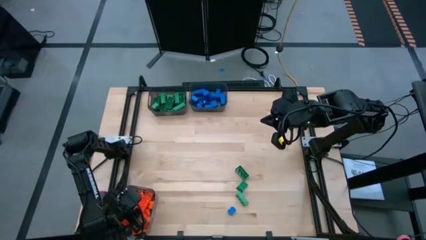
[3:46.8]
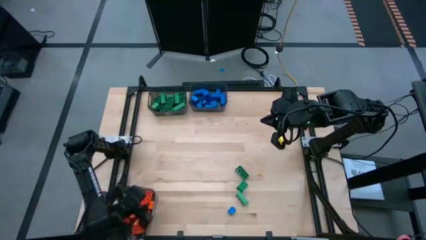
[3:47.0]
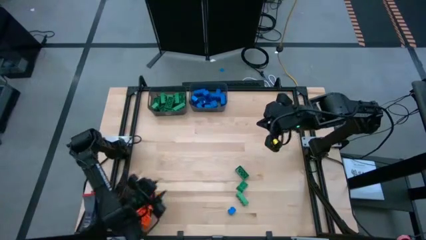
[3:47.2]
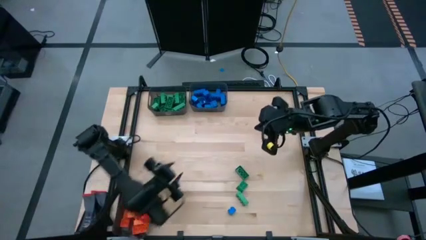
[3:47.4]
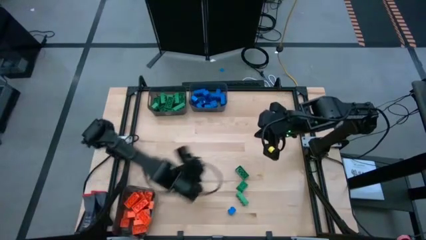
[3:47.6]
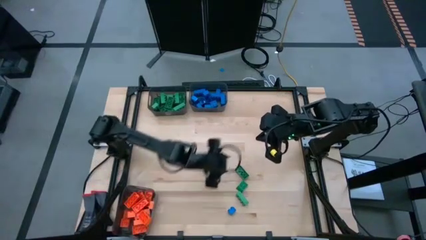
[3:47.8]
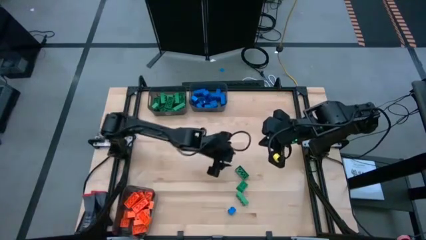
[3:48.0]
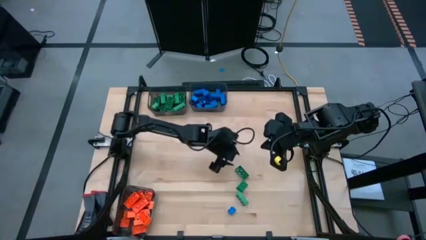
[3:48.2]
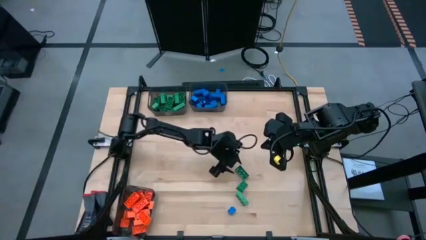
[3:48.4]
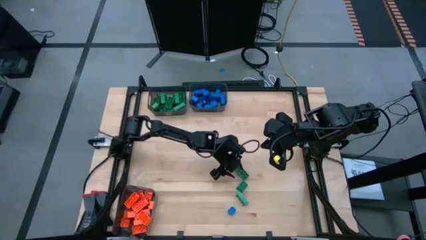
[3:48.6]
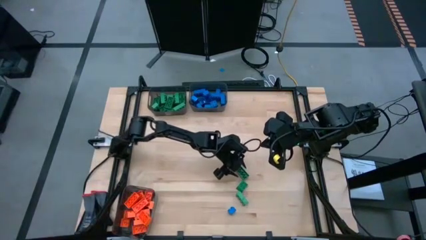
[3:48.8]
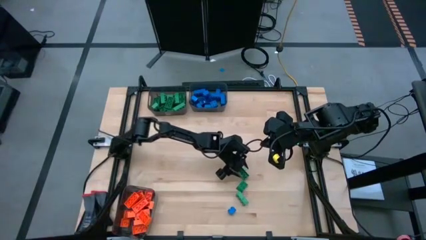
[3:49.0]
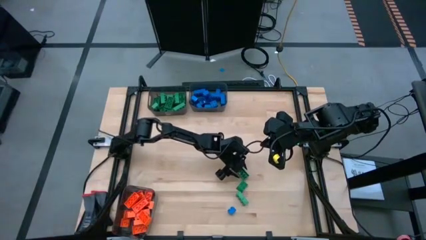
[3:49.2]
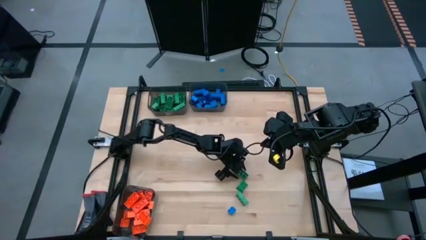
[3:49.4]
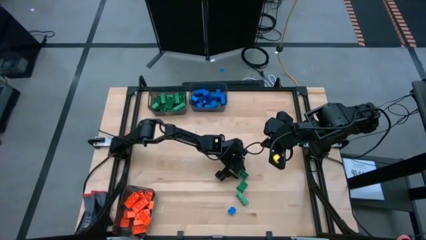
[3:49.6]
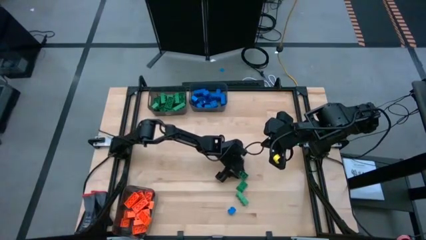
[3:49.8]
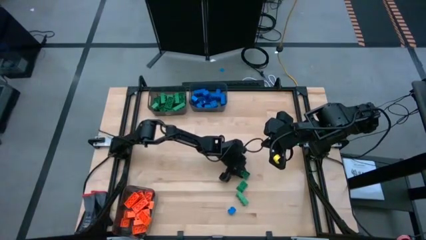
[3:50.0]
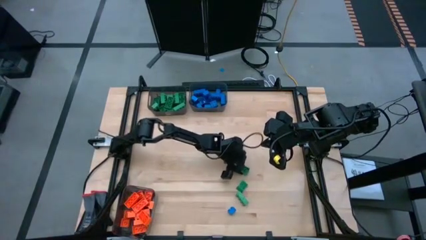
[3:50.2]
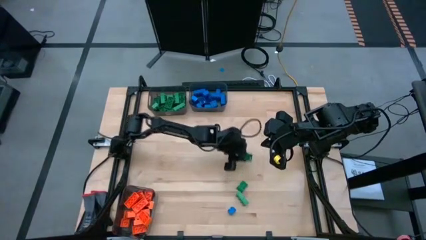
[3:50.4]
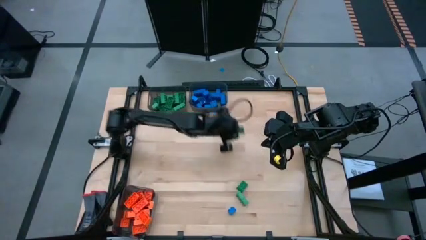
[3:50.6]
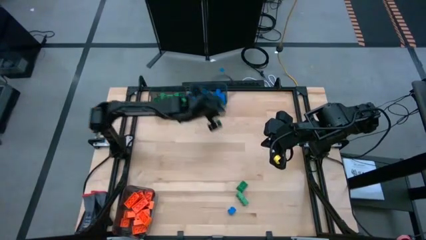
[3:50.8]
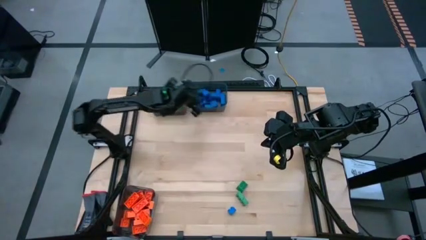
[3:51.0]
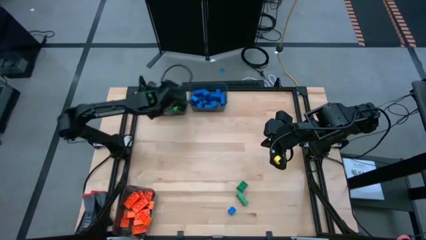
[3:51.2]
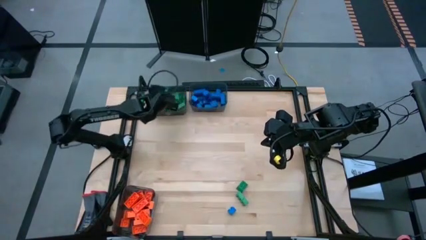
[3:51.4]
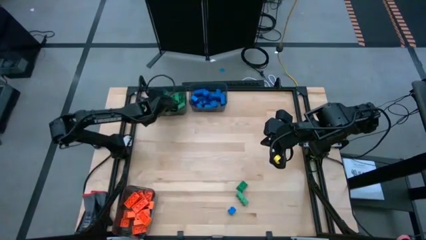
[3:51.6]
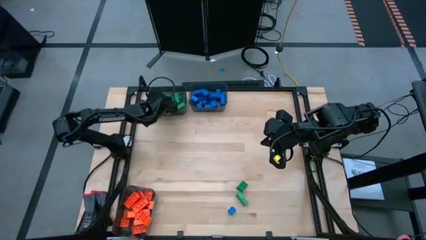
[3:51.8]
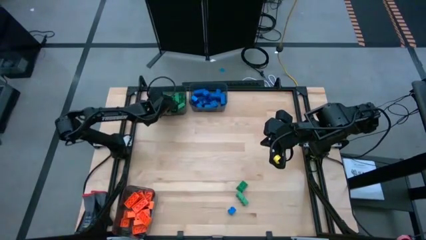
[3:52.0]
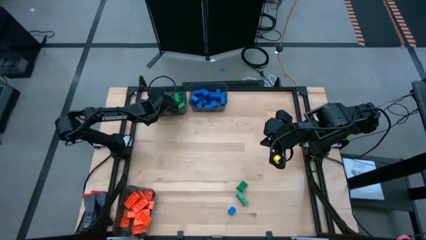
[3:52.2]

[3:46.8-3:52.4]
Task: Sort blocks
Put the green gamepiece into the top left black bin

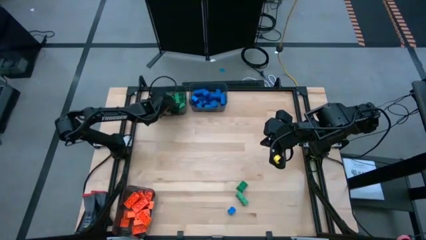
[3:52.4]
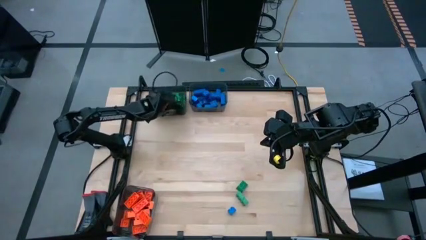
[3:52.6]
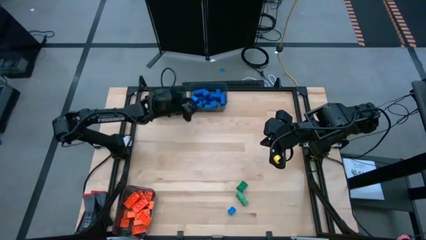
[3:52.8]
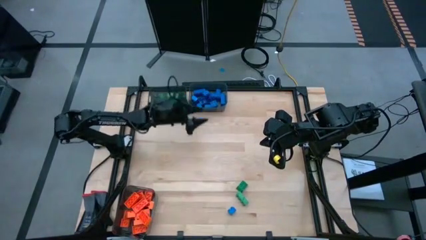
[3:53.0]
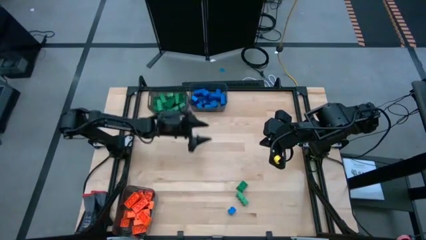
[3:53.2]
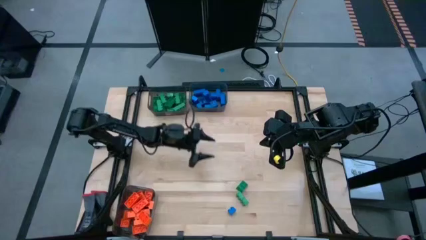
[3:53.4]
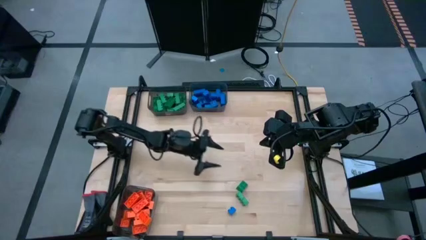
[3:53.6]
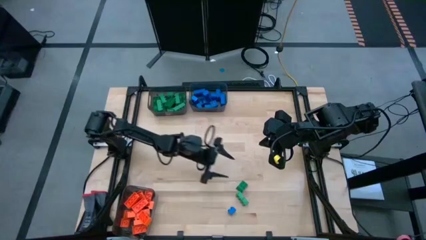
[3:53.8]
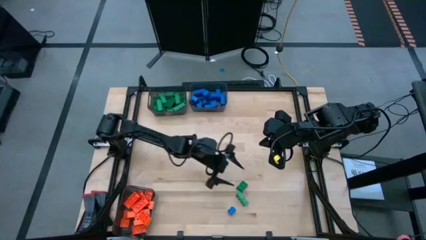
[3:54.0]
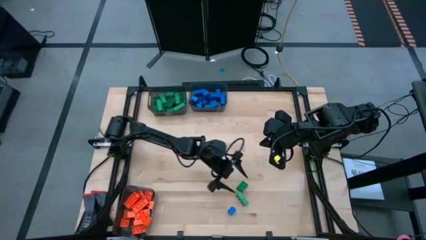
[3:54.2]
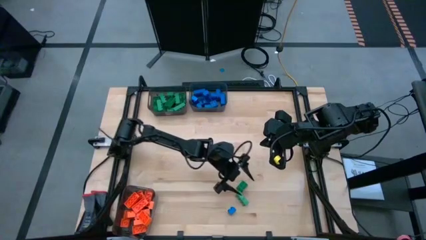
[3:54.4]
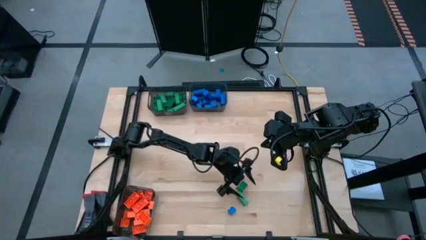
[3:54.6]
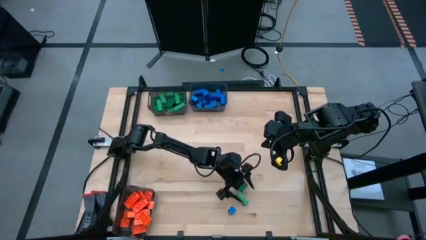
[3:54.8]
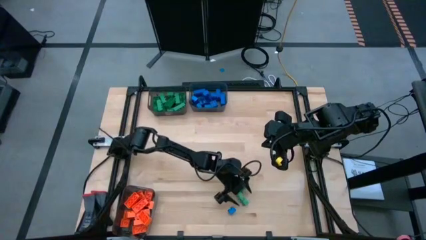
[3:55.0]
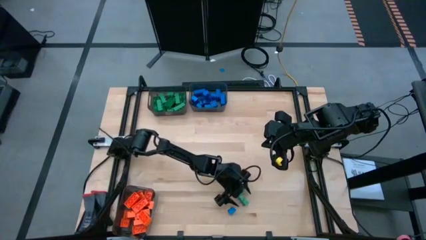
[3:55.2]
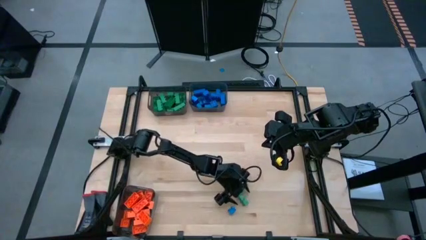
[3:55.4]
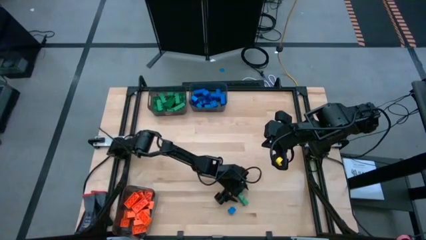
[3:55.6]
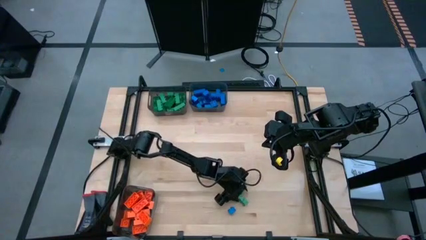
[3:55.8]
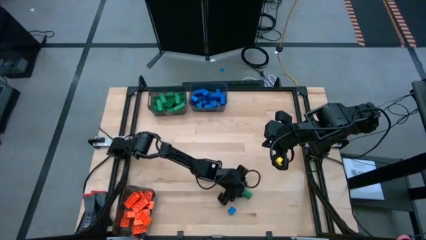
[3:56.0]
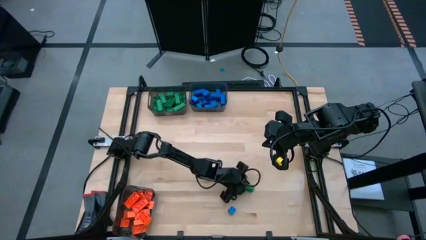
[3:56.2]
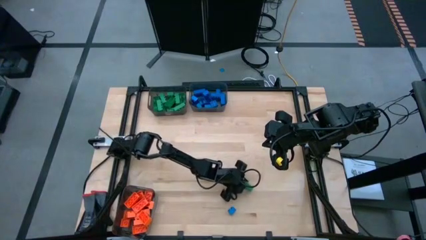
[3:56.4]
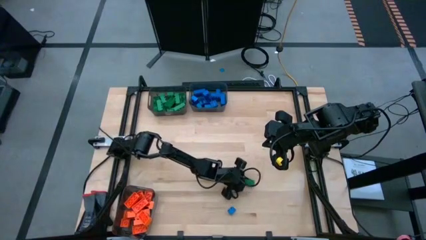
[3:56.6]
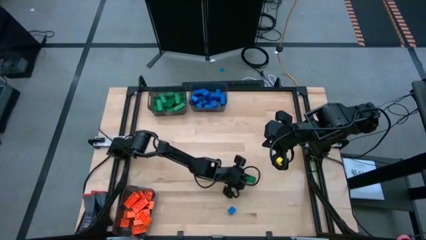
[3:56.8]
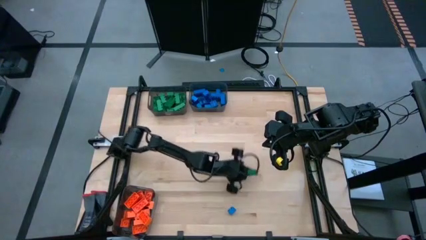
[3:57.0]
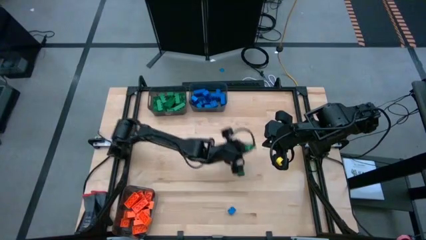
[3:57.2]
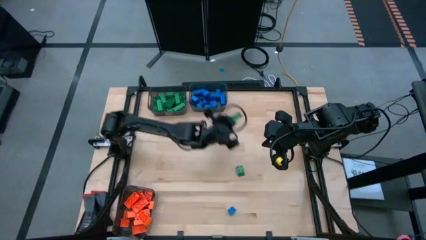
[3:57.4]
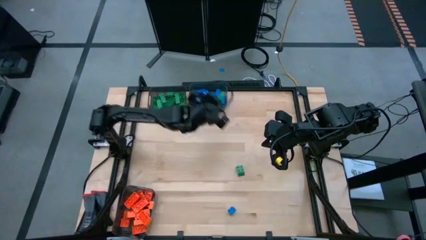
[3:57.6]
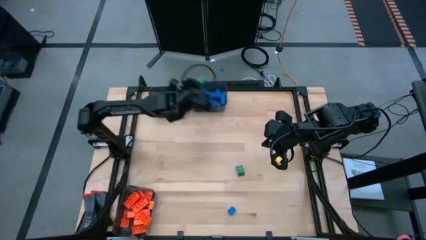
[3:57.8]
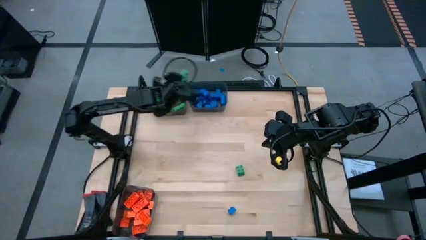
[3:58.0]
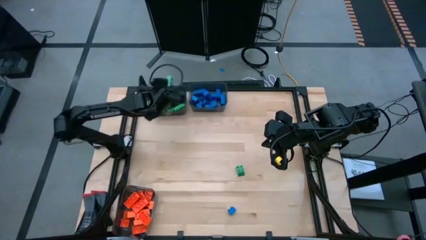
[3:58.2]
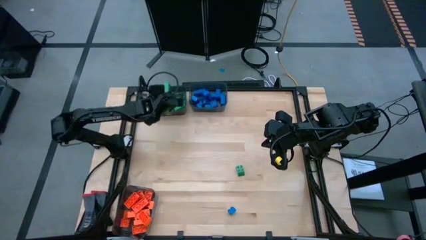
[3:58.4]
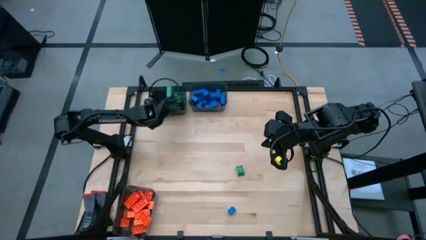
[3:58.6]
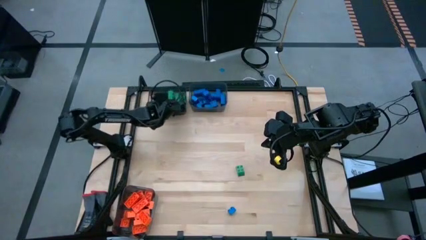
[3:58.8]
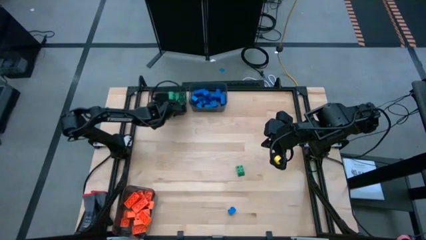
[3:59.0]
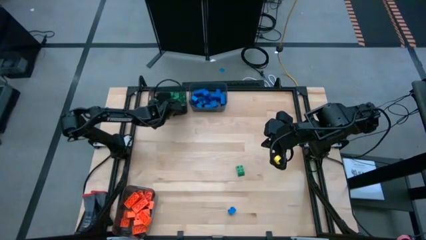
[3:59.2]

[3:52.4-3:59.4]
Put the green gamepiece into the top left black bin

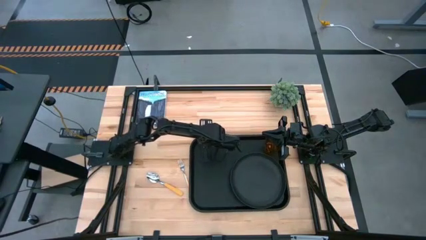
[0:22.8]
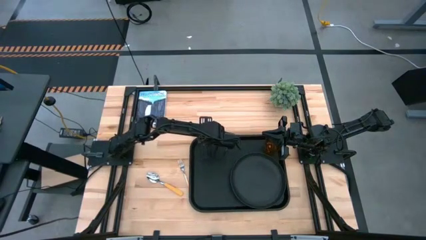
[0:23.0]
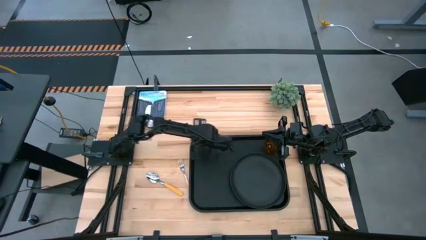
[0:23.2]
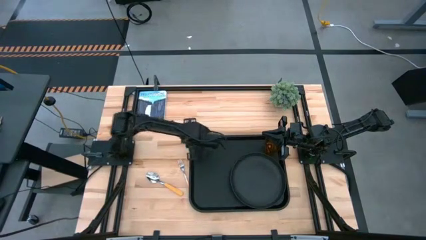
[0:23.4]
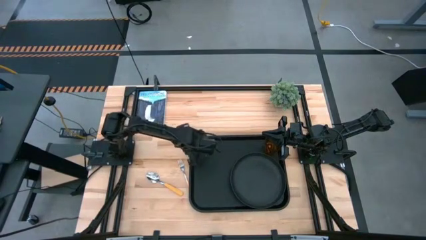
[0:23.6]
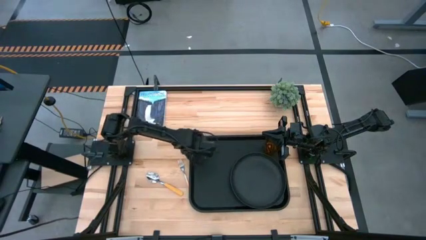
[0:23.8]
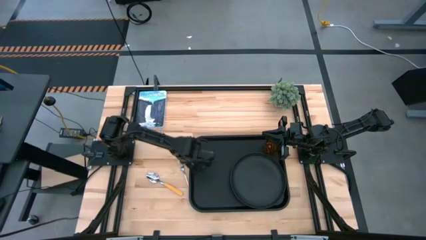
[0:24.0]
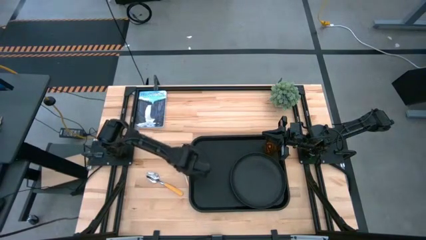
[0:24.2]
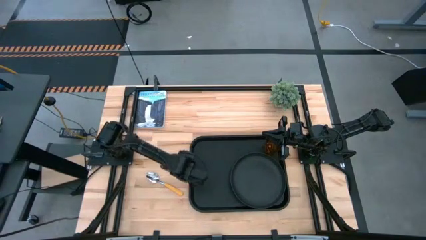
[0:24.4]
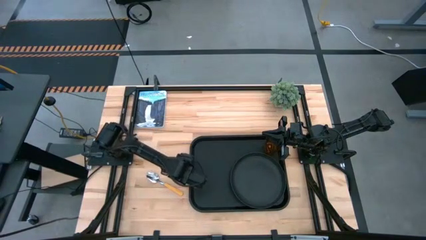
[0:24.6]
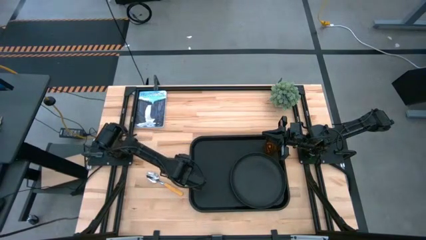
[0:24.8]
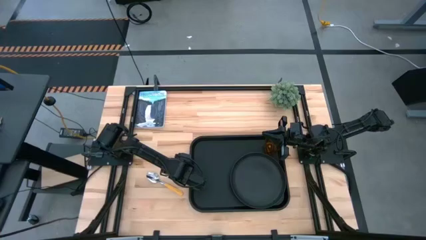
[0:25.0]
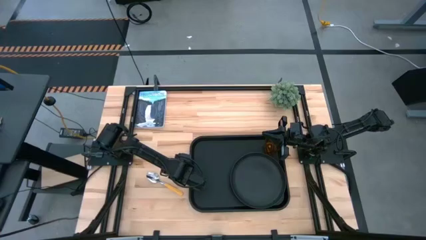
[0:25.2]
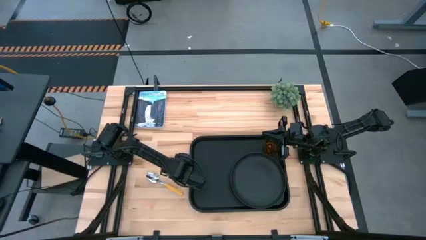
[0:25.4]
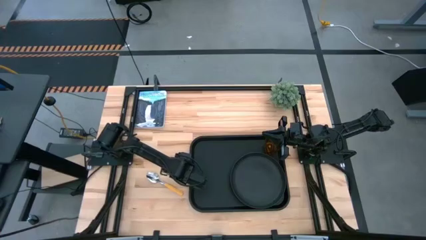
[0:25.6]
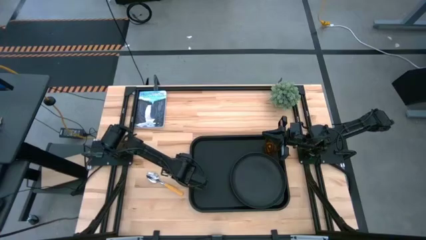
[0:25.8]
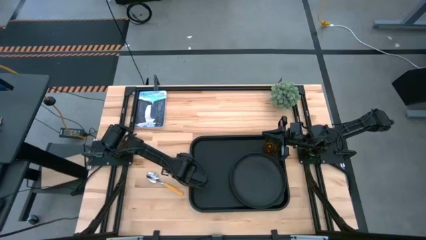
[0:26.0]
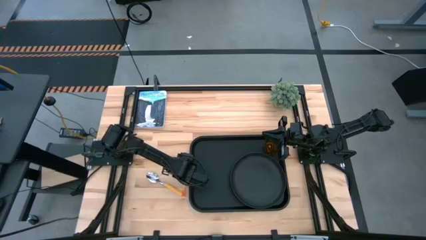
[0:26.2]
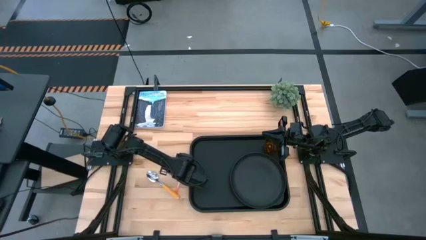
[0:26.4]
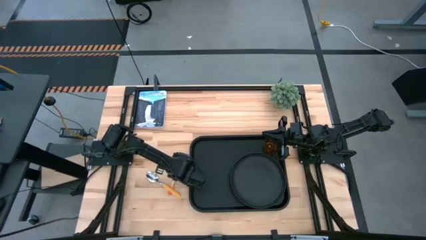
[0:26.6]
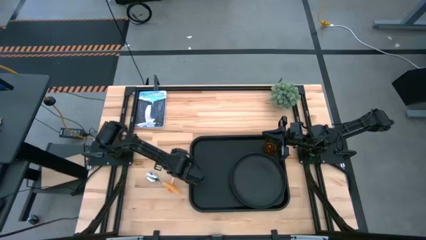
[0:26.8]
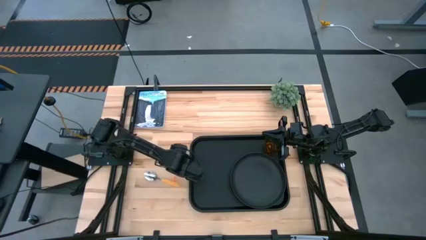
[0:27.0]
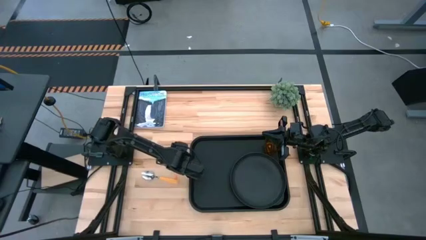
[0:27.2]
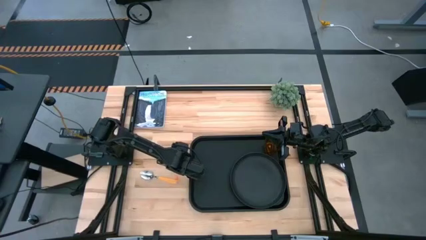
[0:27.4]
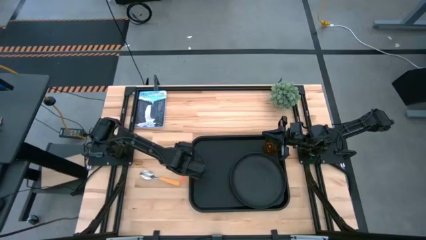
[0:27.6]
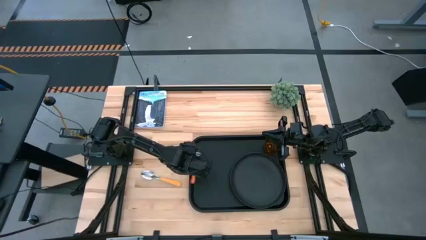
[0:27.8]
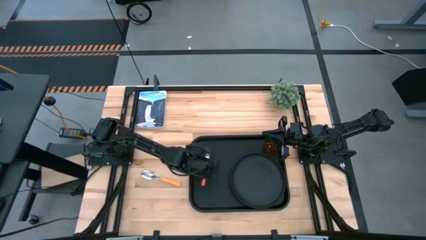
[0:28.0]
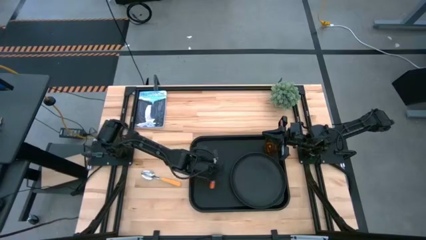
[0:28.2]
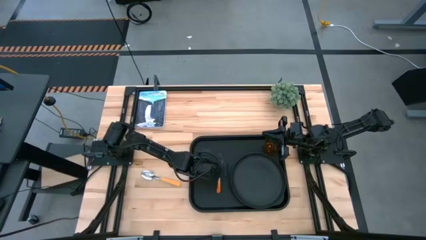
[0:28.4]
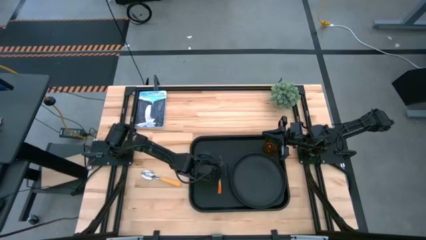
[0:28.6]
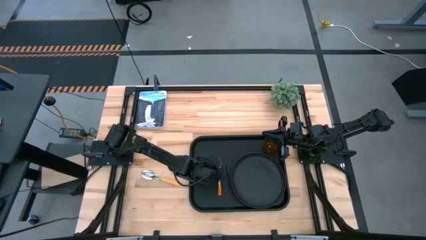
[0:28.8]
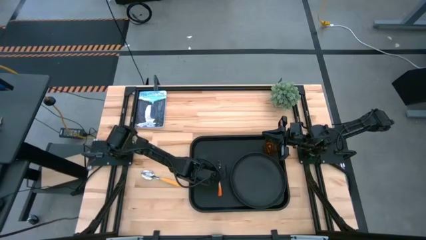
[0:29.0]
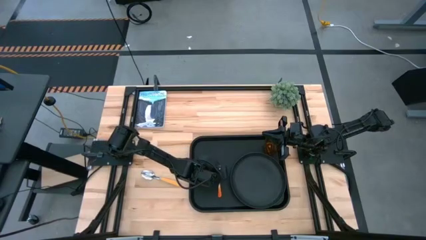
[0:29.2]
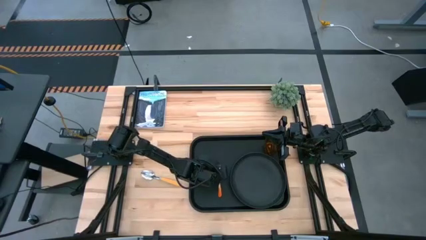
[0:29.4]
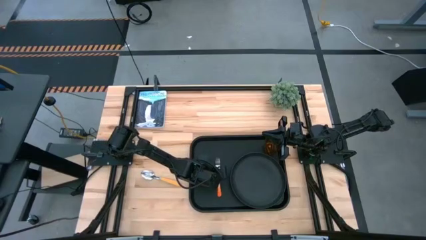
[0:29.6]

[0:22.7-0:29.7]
Task: Pick and place plate/cup/fork/spoon on tray
Put the orange fork to the left of the black plate on the black serving tray
